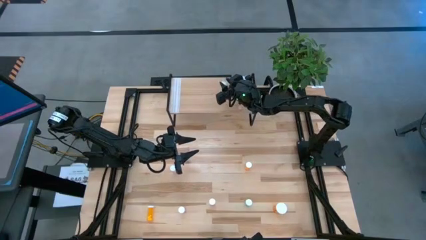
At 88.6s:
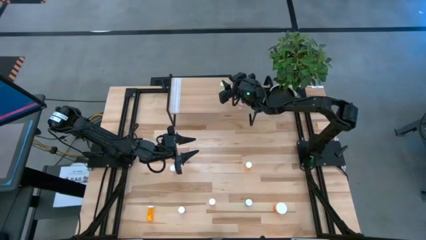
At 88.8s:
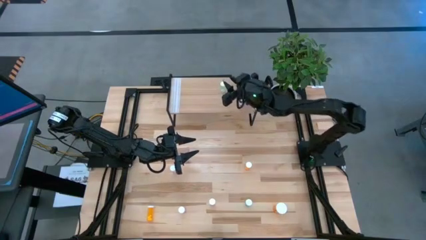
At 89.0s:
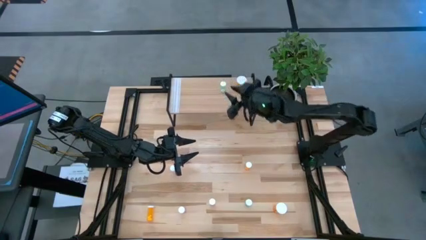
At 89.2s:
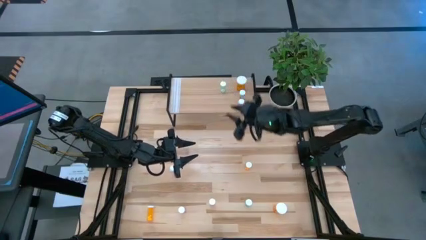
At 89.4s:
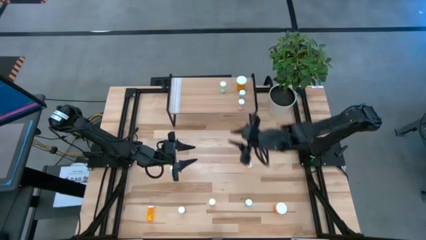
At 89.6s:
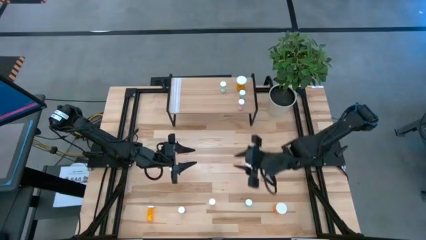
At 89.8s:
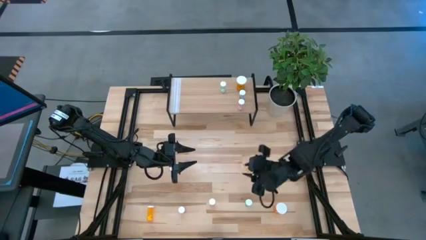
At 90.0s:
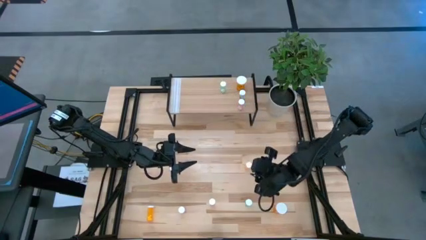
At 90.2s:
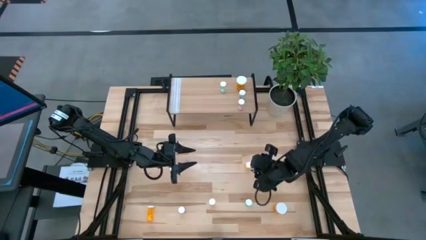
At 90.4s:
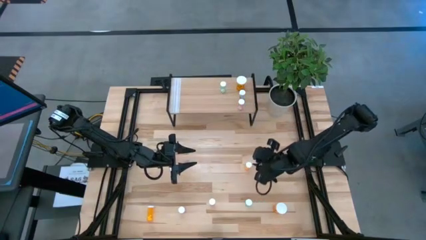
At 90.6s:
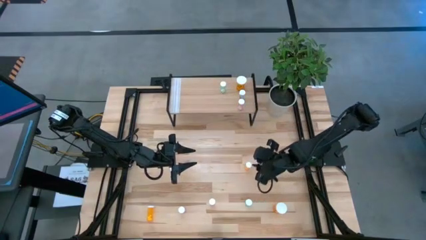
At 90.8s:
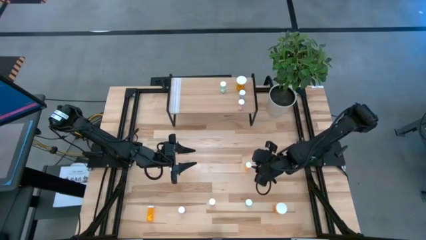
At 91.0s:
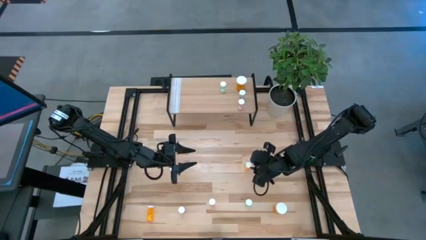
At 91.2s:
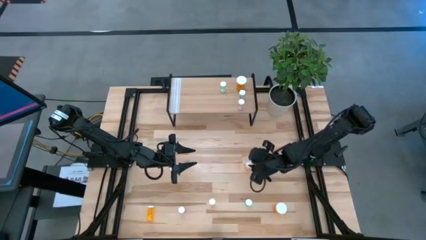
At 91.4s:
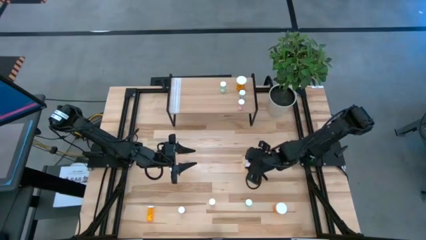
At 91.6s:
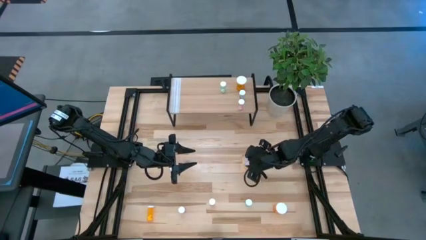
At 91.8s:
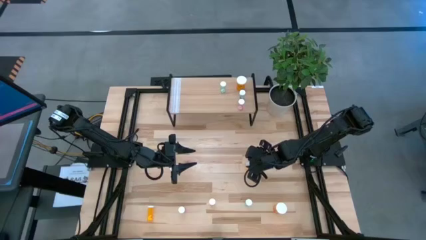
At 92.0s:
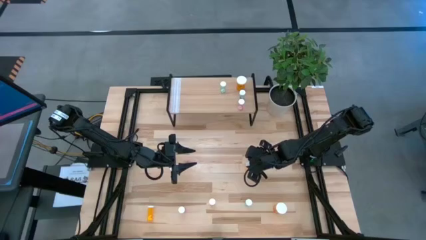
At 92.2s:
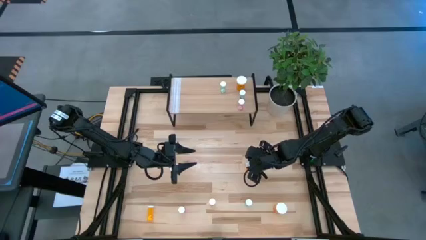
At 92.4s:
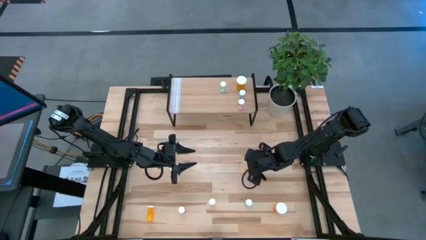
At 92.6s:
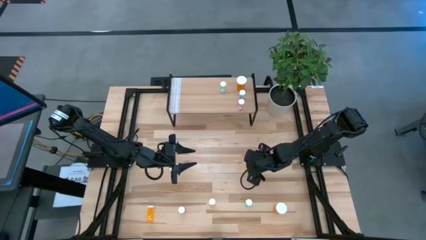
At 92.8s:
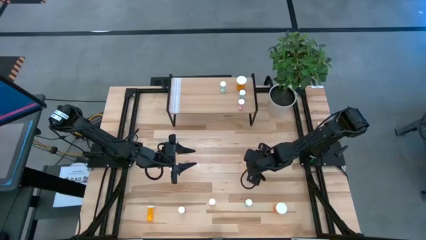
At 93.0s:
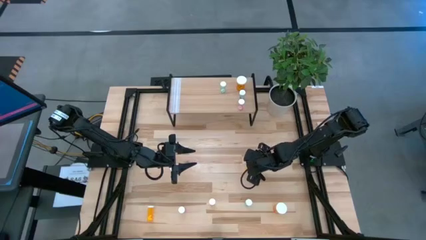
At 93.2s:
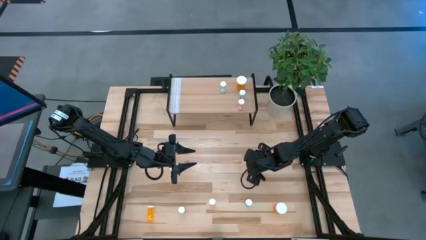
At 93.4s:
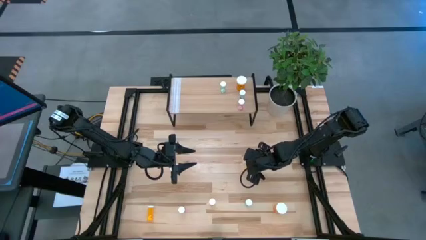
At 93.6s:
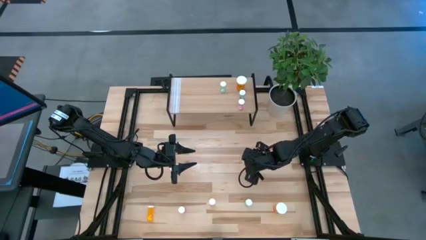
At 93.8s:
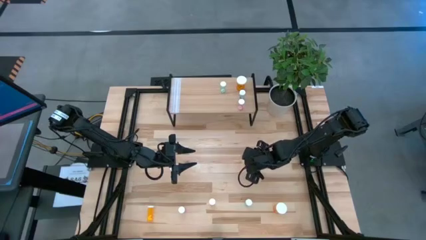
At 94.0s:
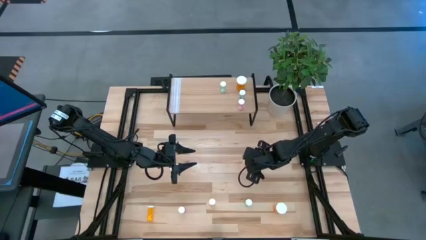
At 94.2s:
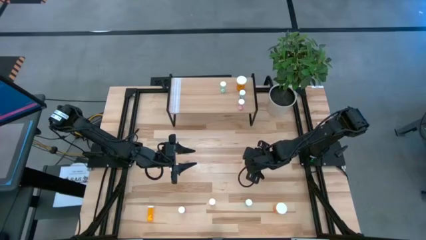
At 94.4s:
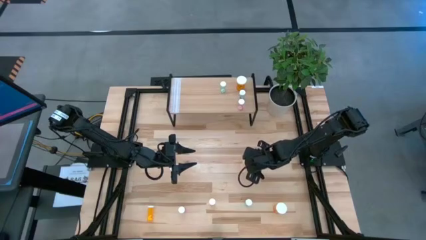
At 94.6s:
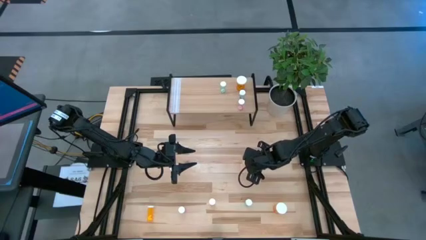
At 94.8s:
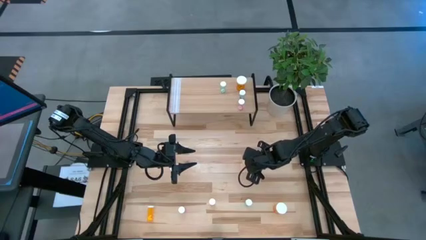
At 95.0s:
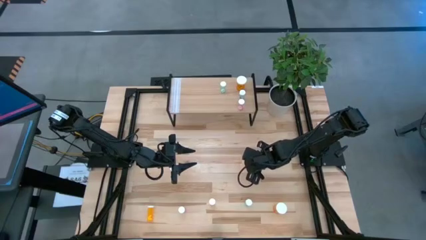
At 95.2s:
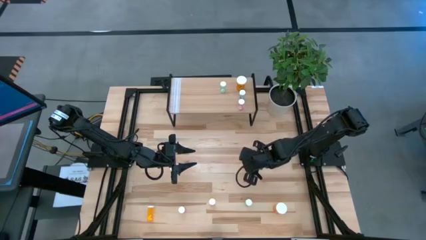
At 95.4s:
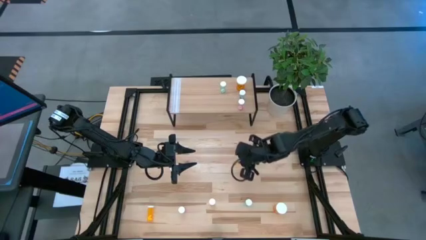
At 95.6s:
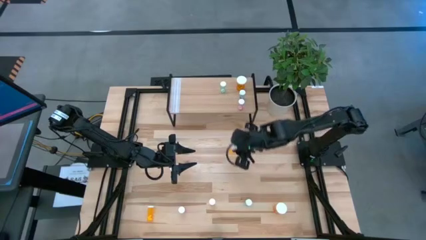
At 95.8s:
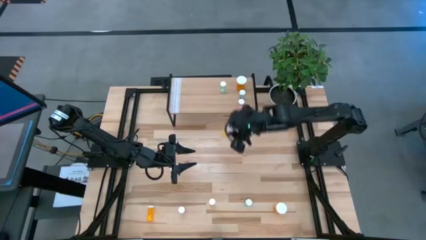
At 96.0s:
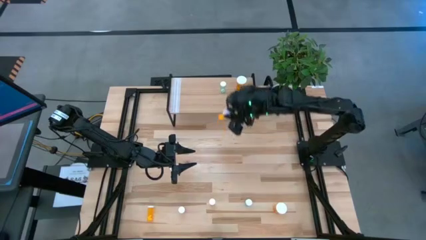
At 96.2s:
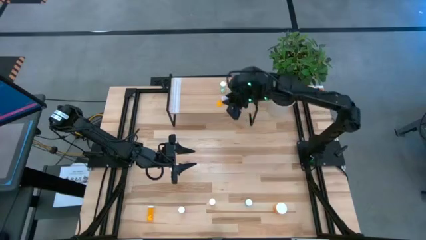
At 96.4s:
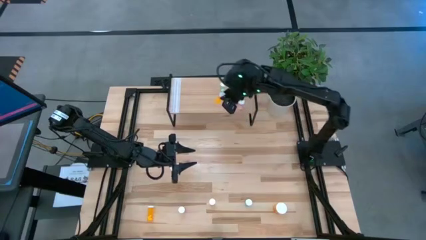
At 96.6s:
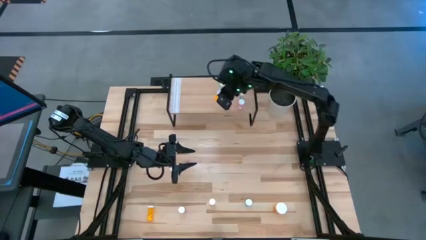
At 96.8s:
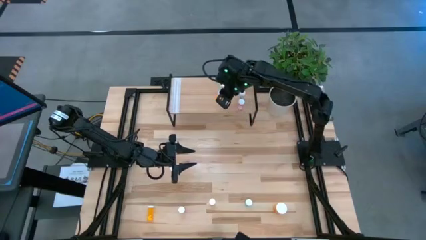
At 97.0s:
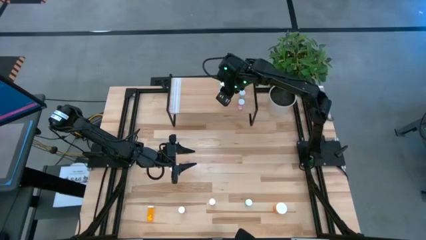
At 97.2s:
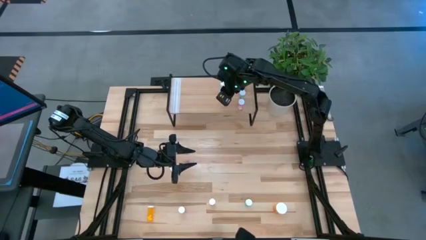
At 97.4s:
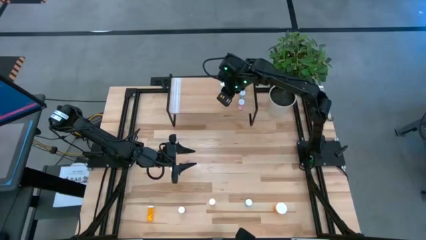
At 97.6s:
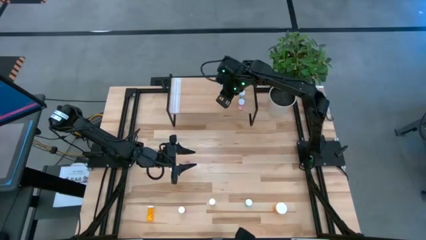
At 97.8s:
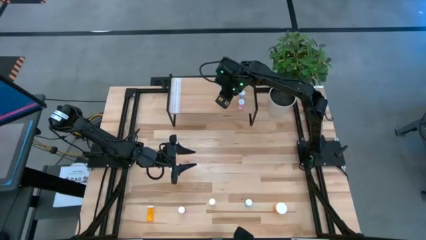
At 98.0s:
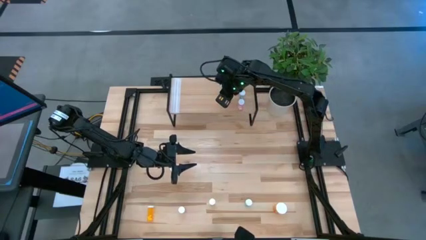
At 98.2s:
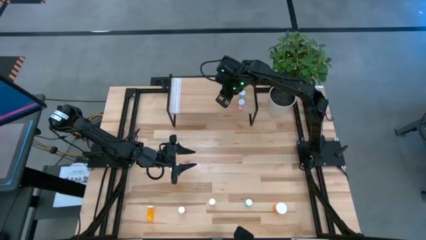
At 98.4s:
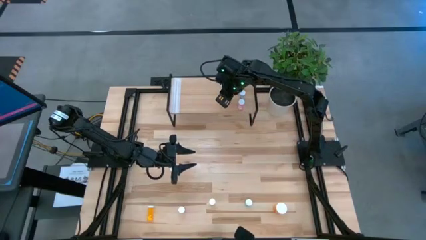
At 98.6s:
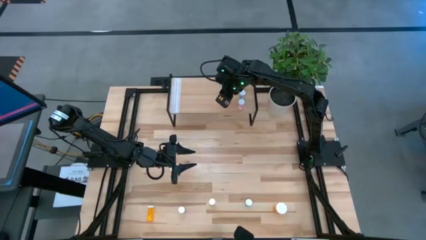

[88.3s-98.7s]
Task: Pick and place medicine bottles onto shelf by color
Put the top small orange pill bottle on the shelf

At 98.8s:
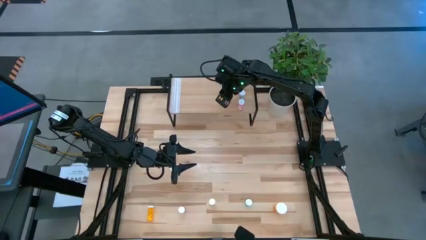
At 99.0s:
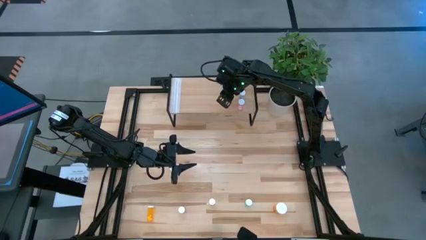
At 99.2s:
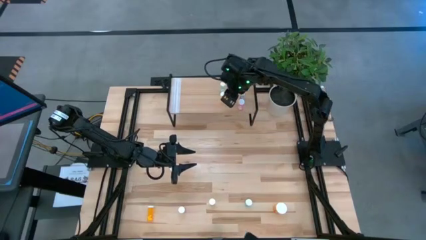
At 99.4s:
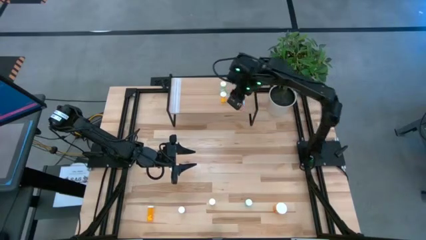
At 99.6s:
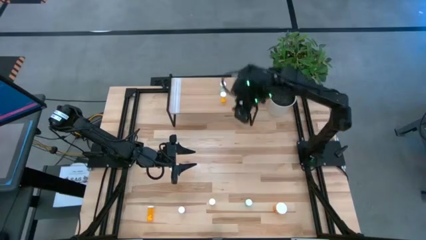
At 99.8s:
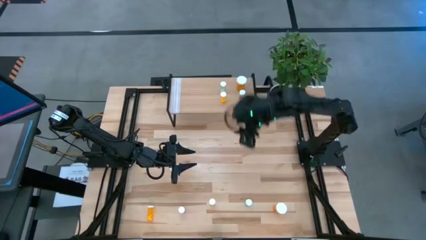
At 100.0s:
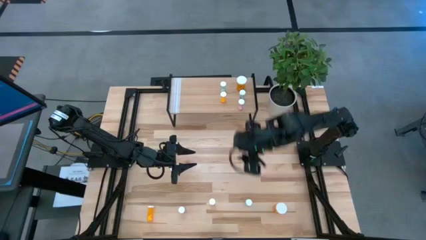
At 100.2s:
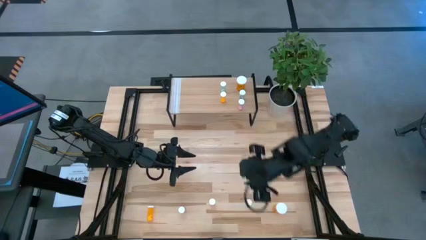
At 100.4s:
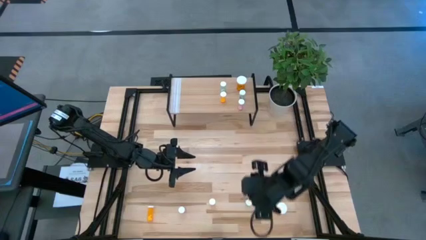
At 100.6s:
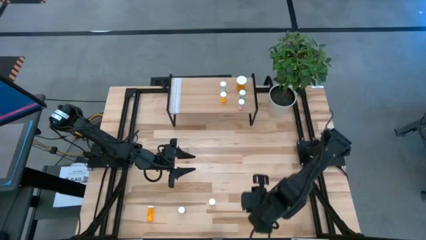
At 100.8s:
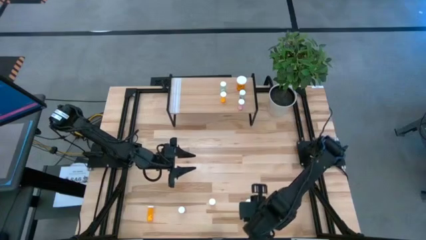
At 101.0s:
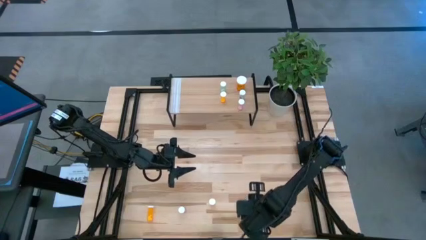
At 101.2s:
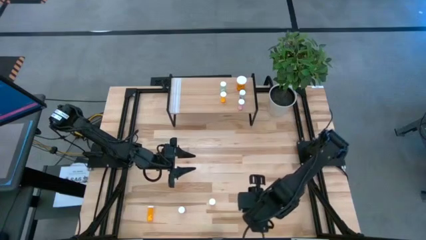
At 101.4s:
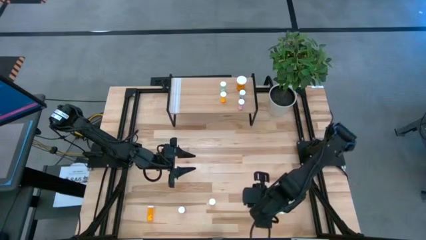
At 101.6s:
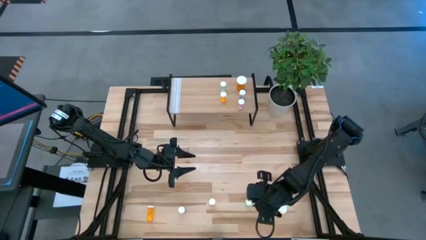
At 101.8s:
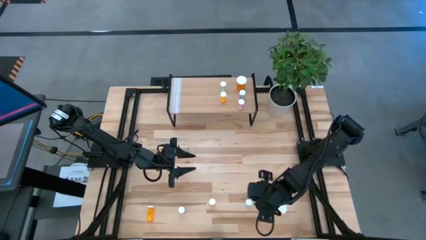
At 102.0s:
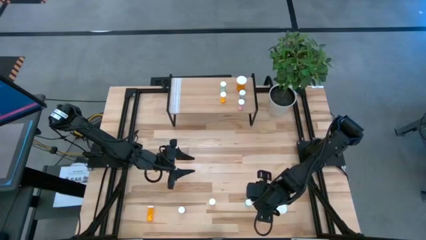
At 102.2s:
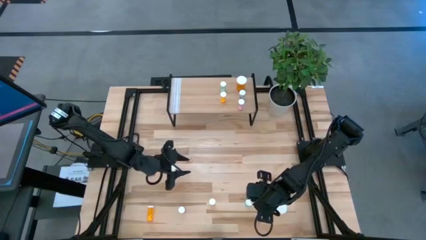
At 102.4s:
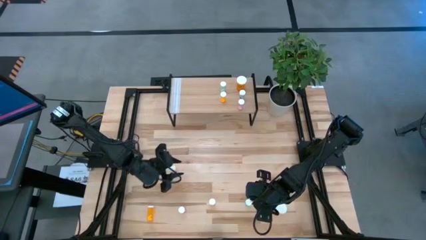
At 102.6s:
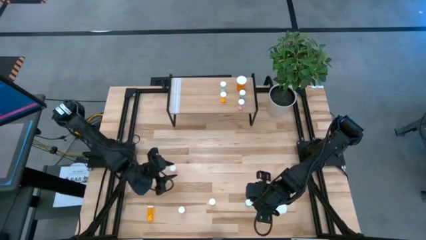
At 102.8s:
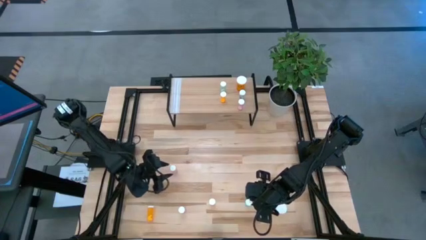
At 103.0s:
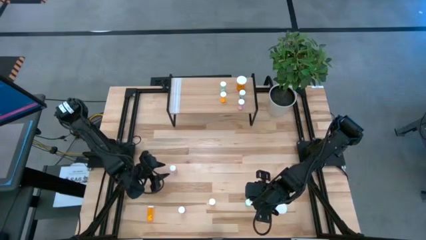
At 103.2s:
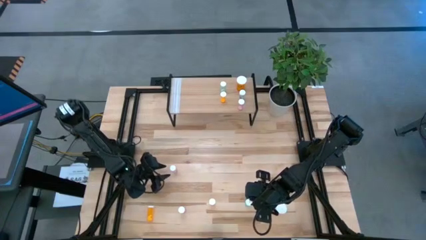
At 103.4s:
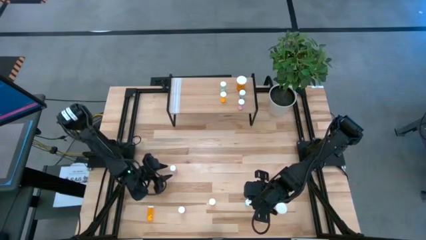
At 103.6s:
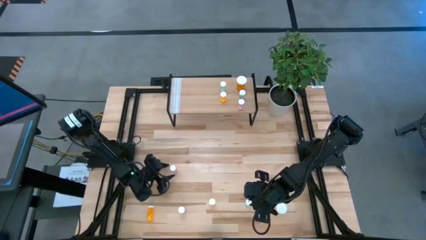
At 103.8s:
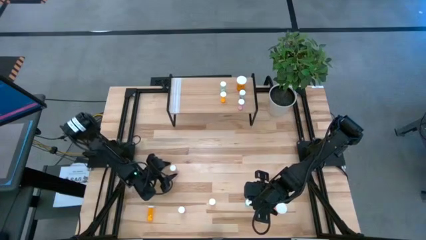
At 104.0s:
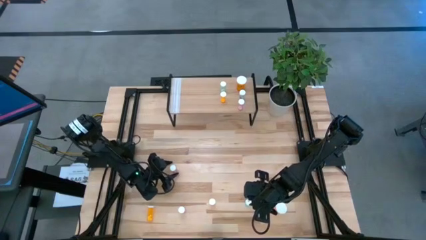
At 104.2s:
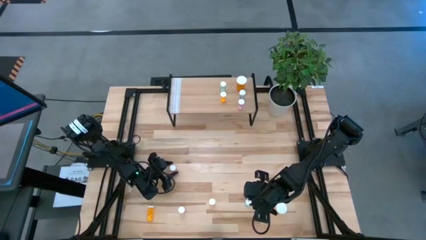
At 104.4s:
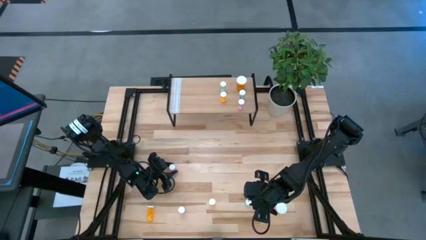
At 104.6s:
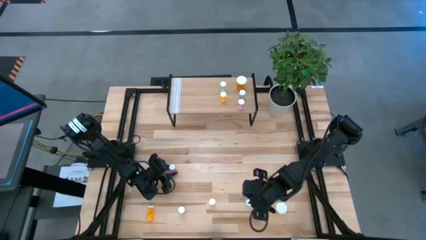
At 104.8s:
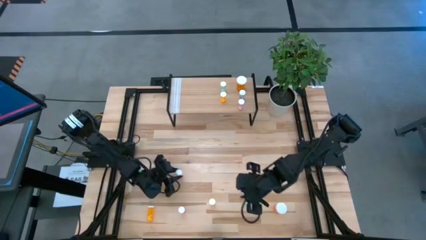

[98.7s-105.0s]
Put the top small purple pill bottle on the shelf
